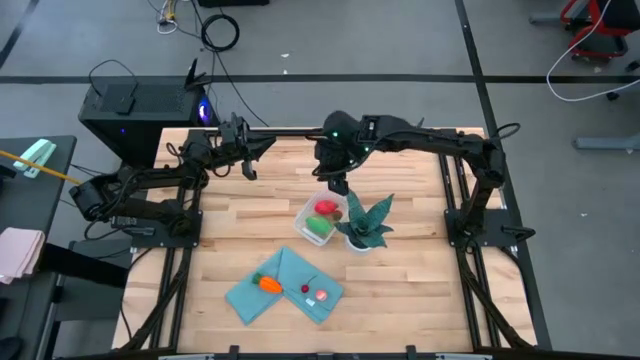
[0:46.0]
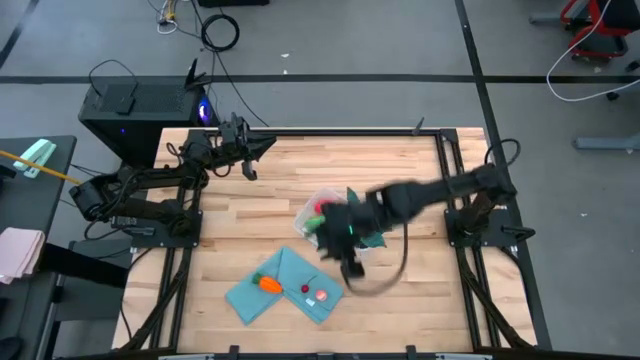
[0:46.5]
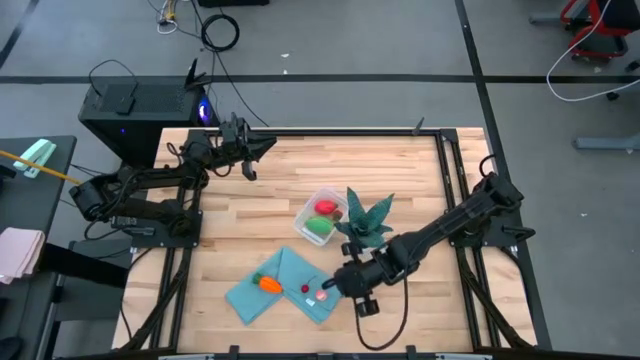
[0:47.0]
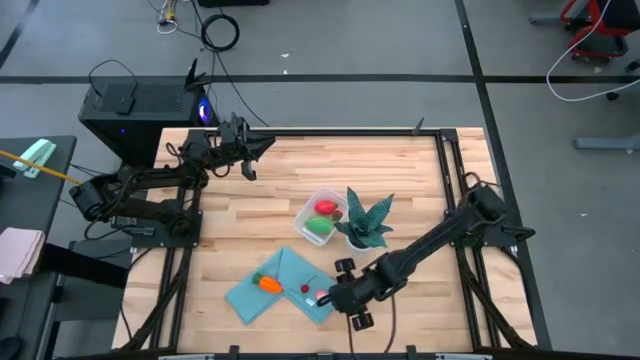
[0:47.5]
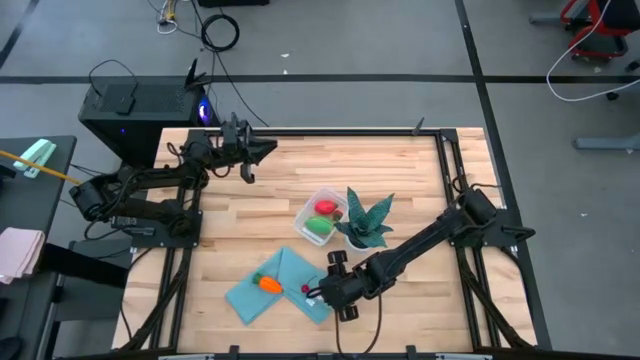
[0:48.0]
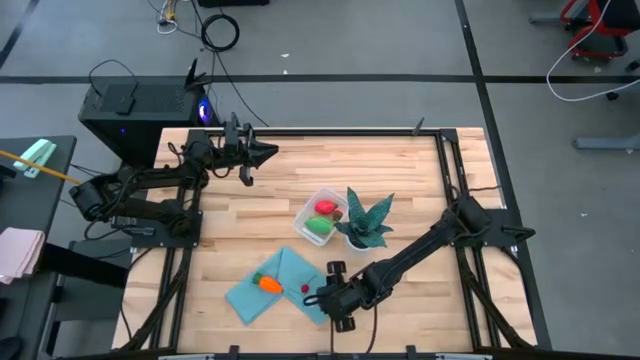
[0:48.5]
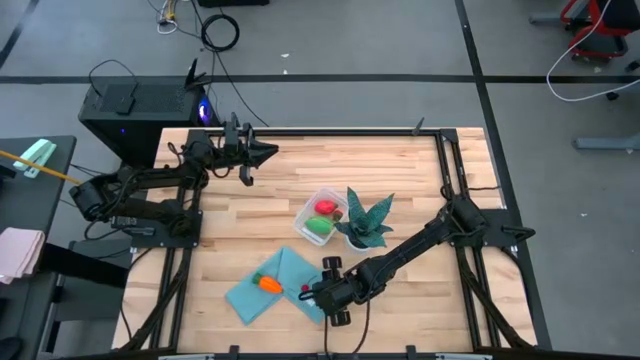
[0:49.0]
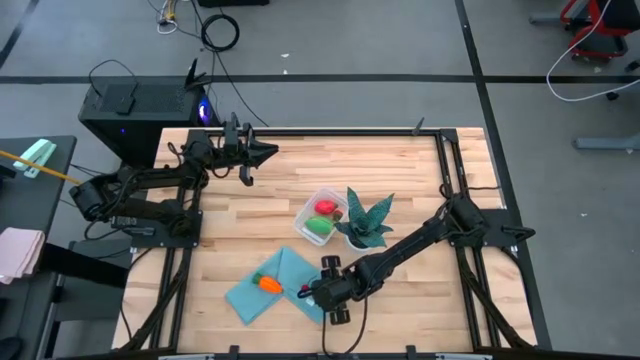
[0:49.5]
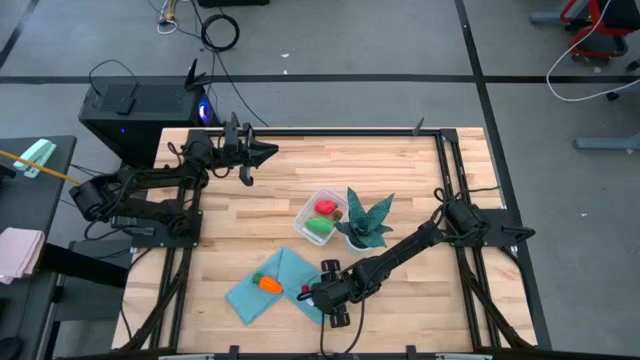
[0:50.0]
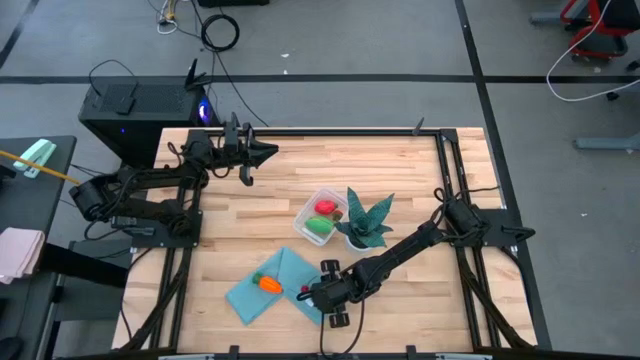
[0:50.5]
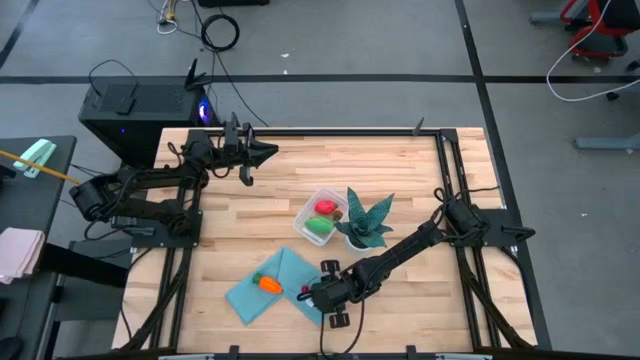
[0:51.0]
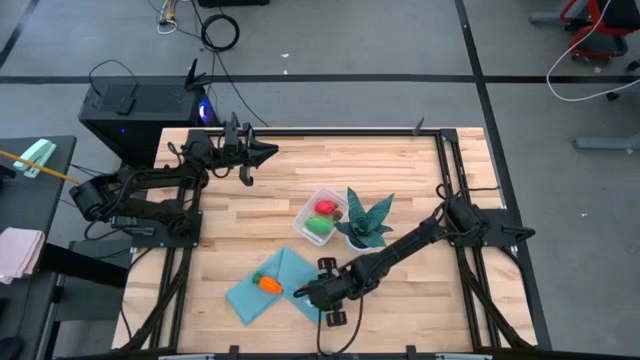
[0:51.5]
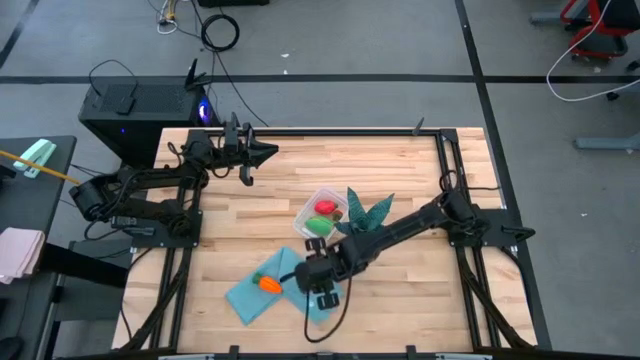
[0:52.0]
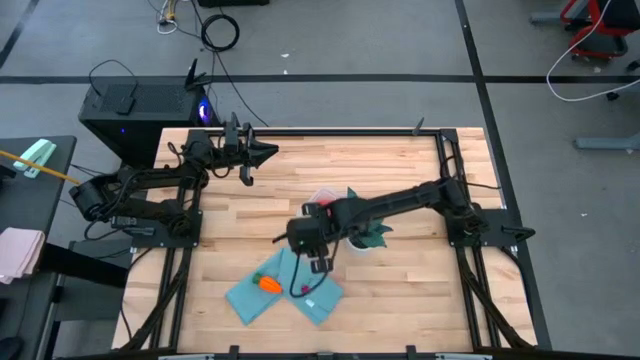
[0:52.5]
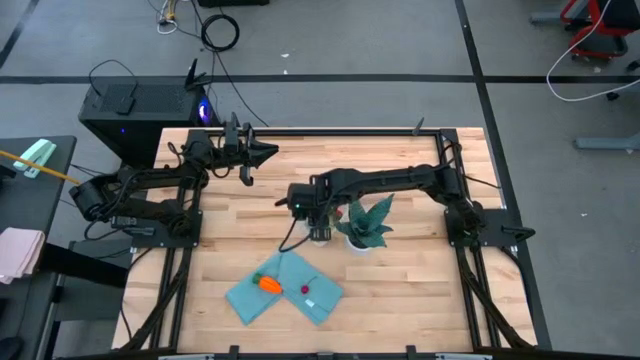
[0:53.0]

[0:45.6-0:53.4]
Task: Pick and placing Produce into tupperware
Put the peach into the container

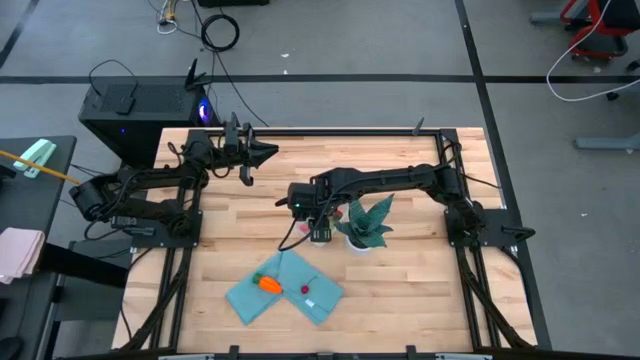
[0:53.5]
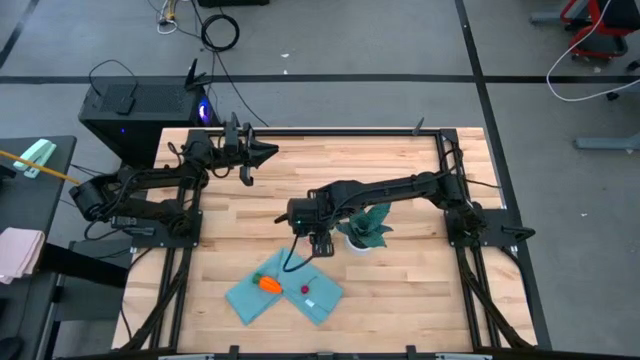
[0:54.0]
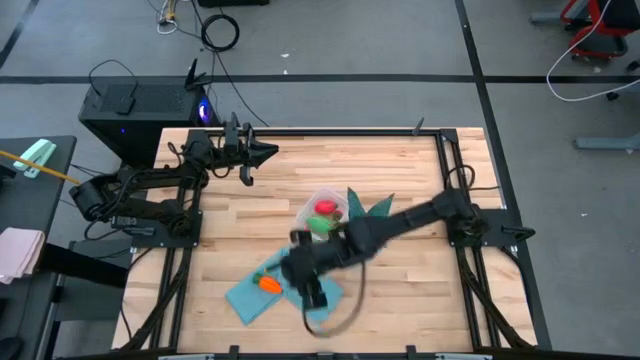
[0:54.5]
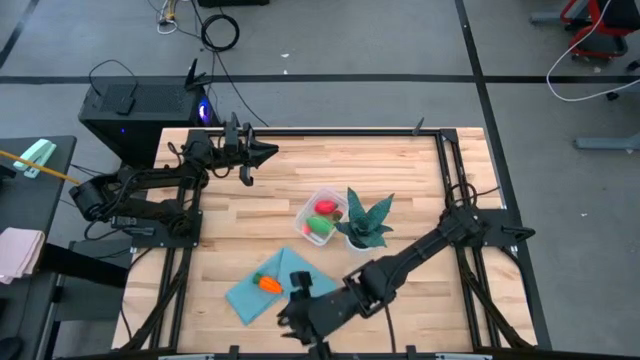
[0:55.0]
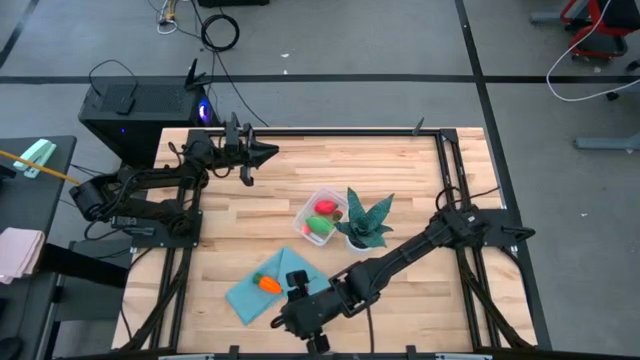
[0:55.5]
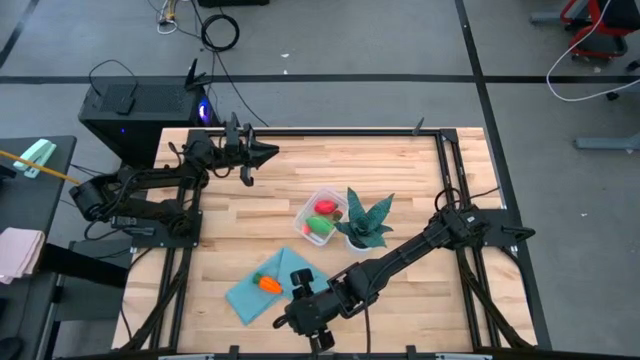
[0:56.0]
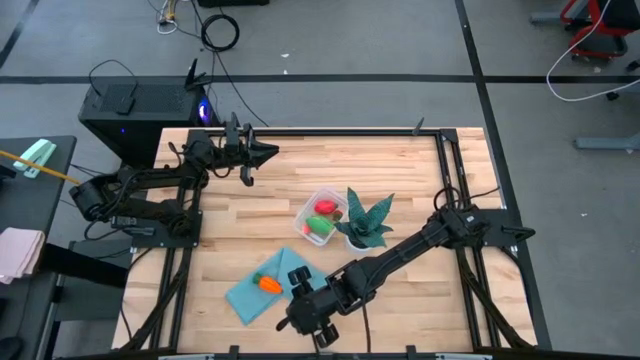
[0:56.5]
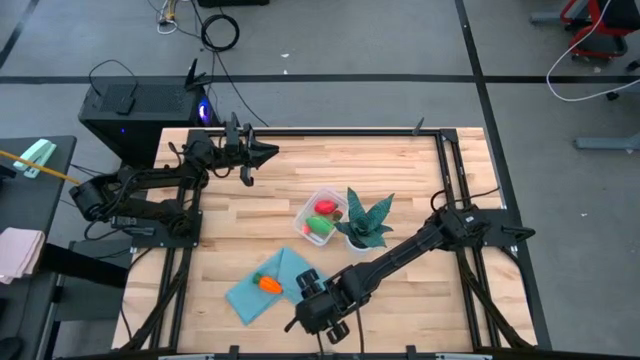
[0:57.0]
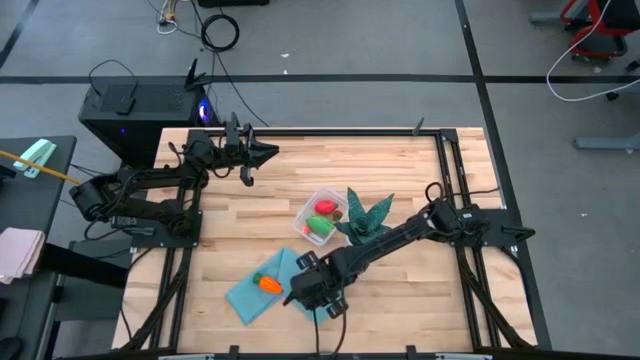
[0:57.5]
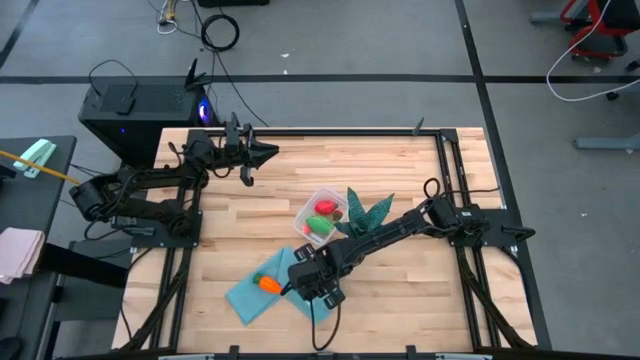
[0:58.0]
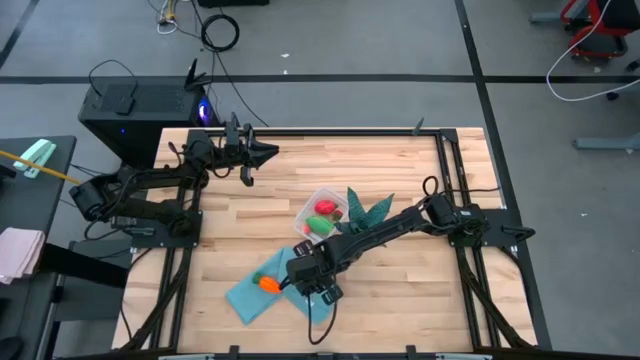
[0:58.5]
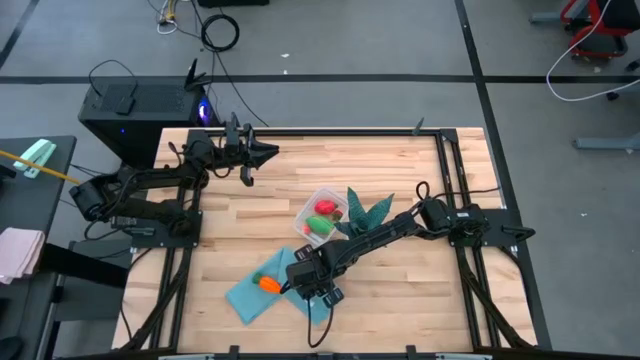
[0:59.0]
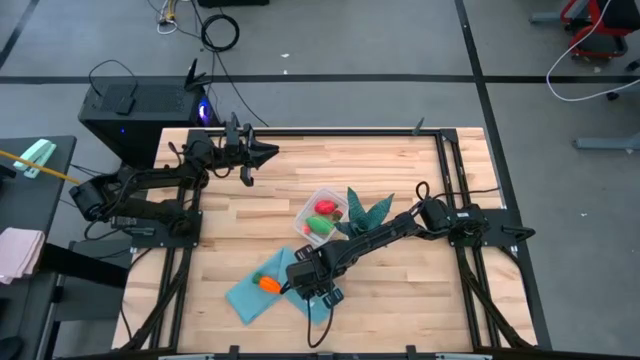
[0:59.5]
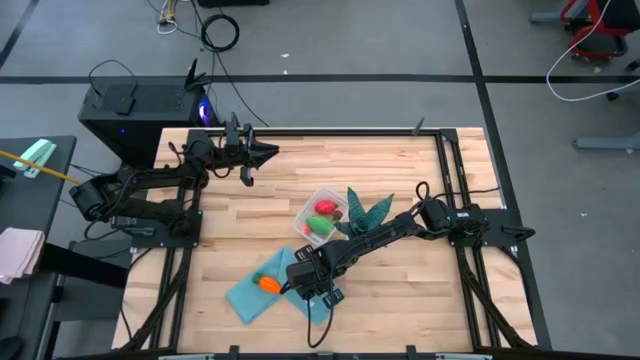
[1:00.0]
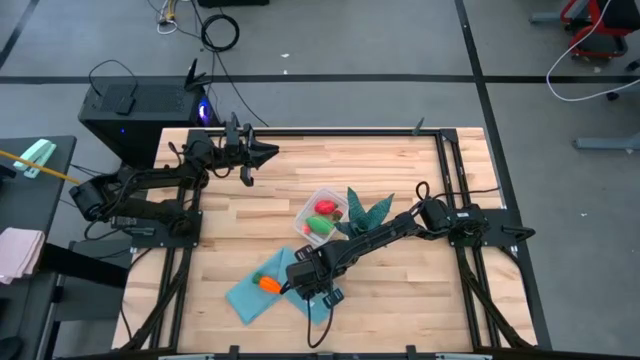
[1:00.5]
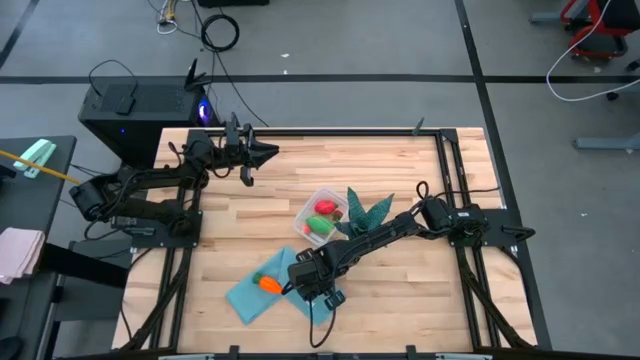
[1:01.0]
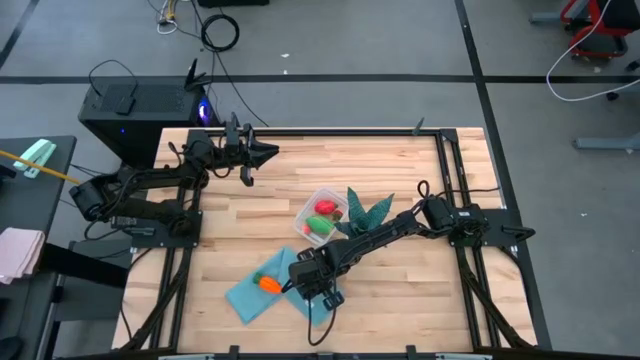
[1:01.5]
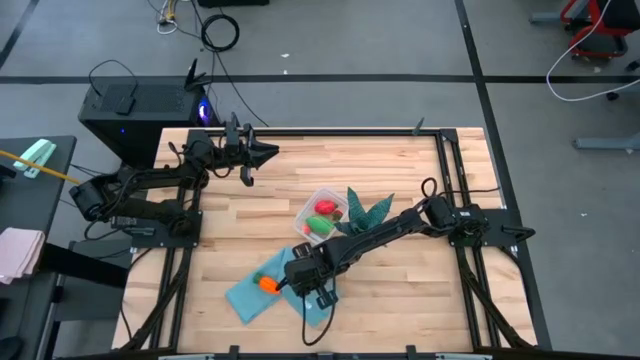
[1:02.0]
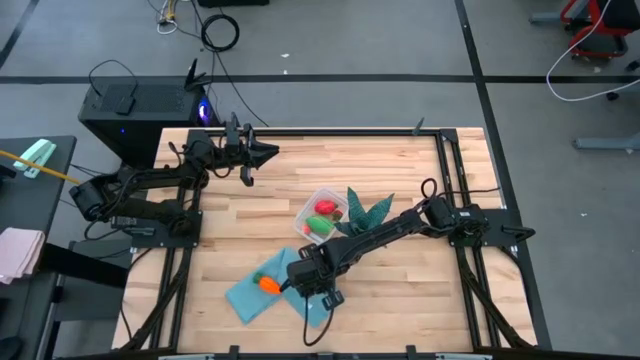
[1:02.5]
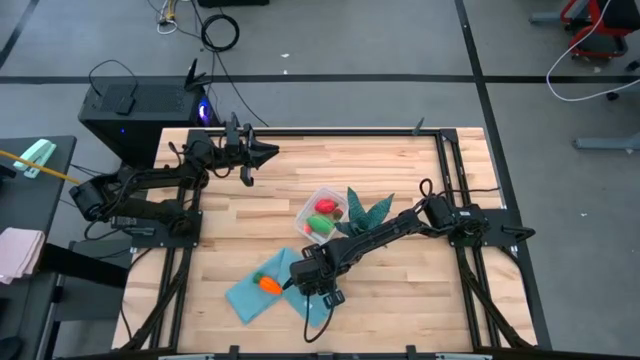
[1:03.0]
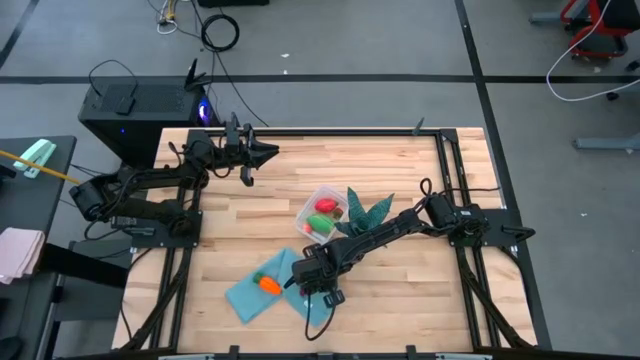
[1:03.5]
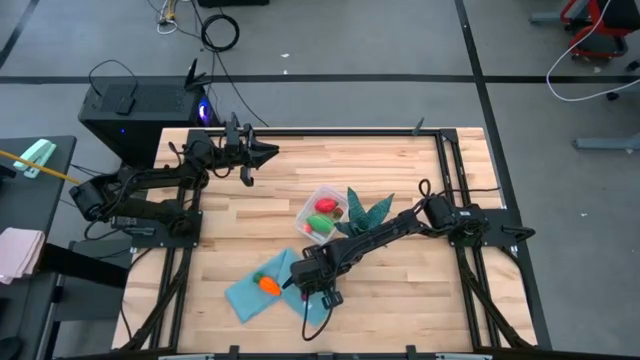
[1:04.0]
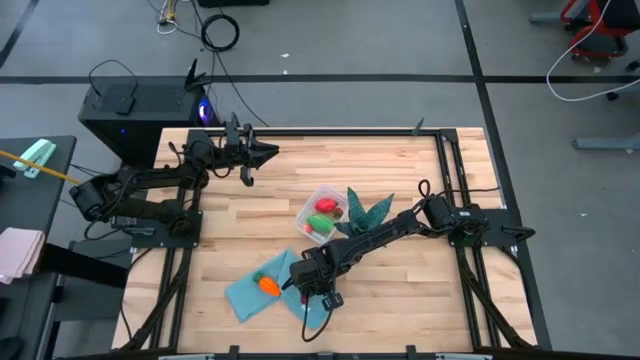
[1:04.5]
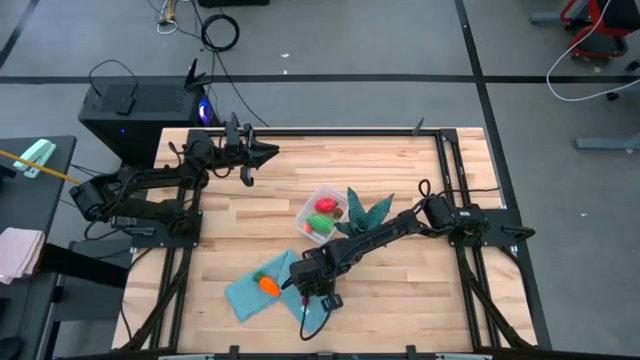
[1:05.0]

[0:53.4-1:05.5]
Put the cherry into the container

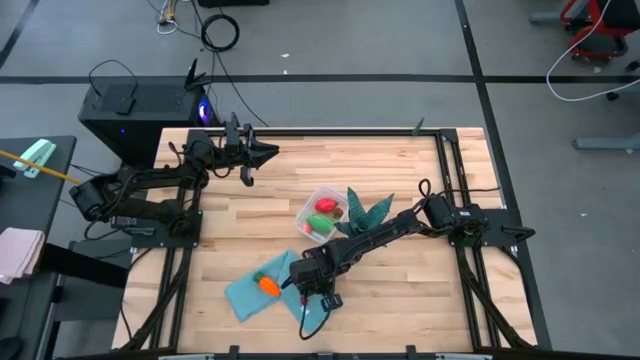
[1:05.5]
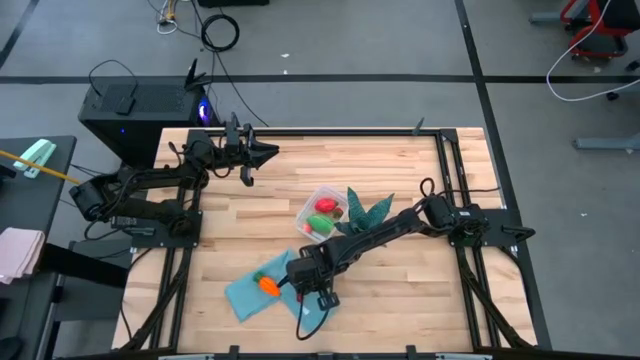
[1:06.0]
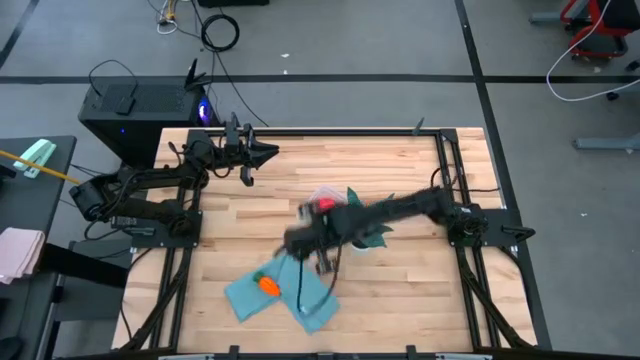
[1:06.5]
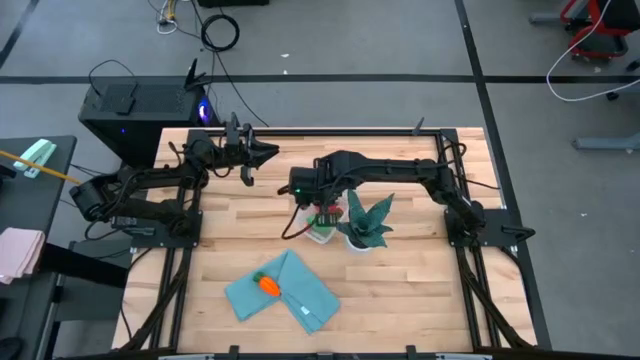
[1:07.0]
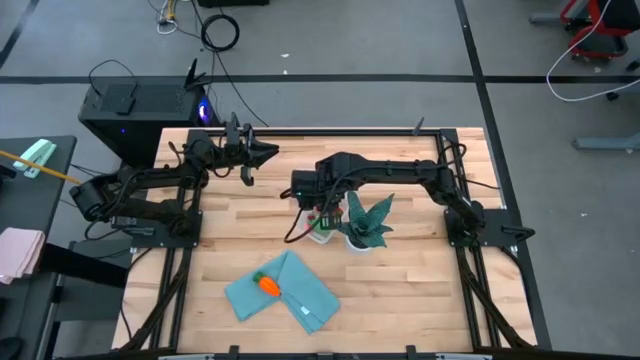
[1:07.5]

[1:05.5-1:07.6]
Put the cherry into the container
